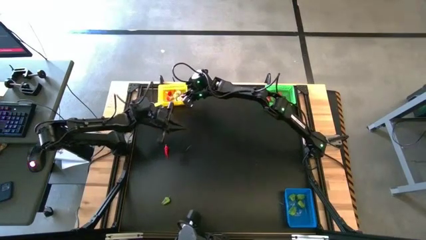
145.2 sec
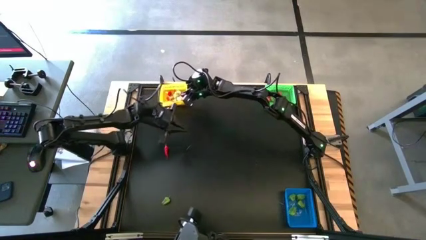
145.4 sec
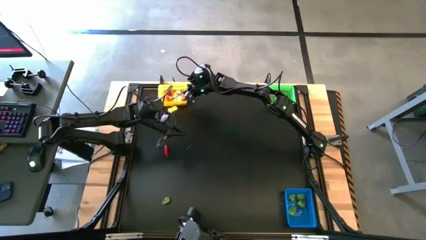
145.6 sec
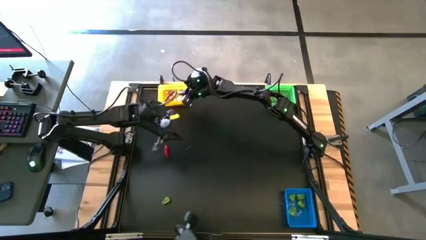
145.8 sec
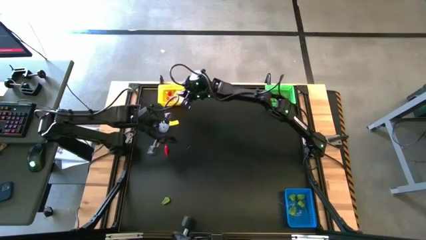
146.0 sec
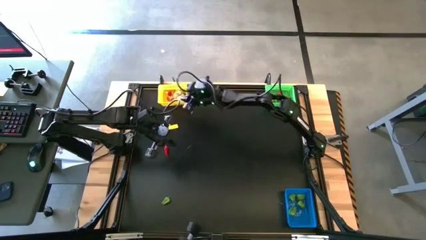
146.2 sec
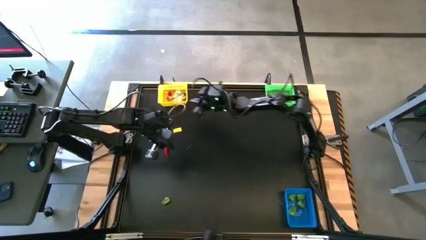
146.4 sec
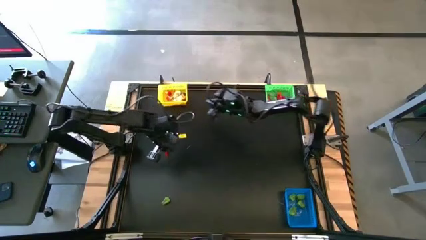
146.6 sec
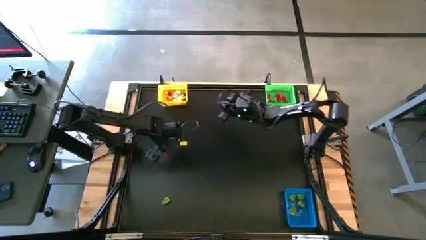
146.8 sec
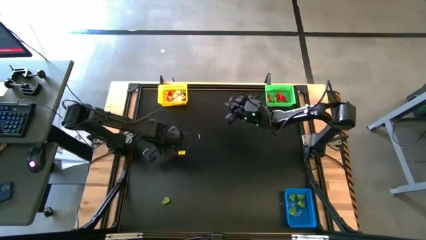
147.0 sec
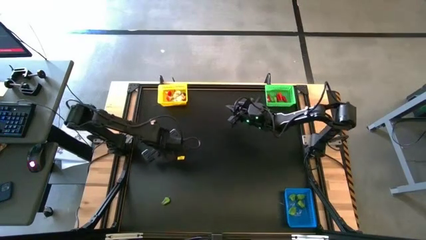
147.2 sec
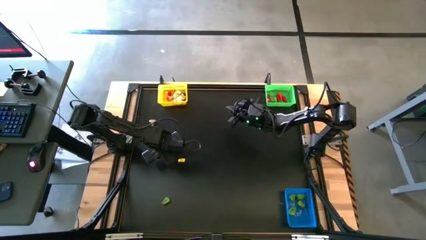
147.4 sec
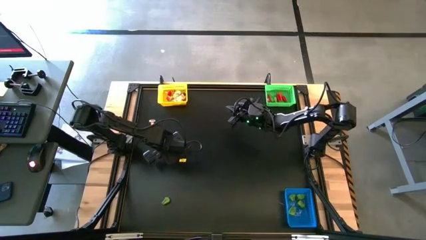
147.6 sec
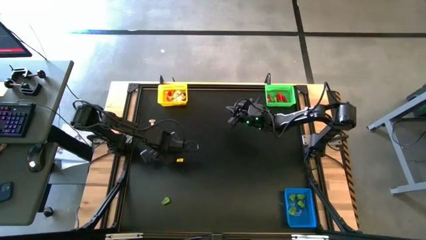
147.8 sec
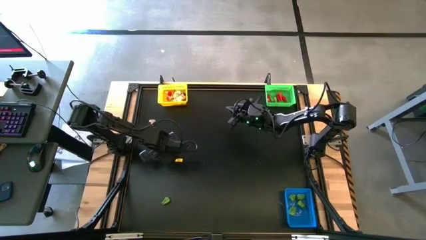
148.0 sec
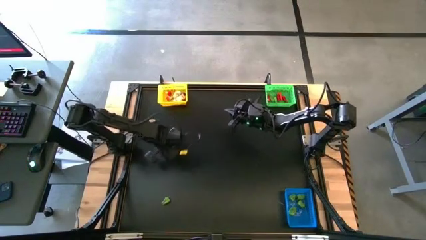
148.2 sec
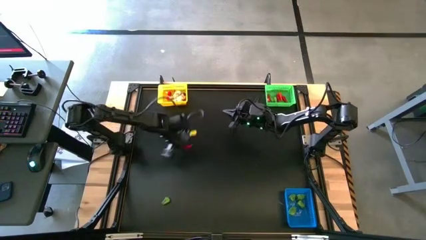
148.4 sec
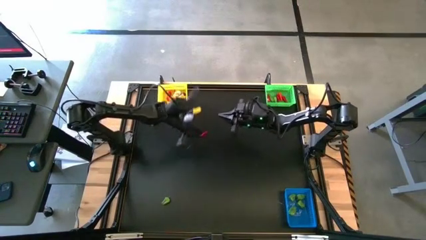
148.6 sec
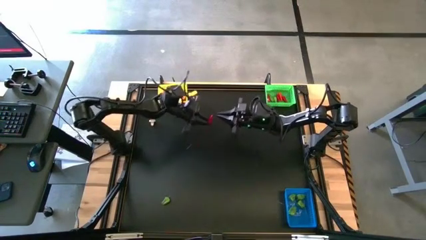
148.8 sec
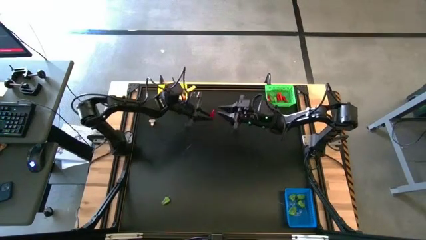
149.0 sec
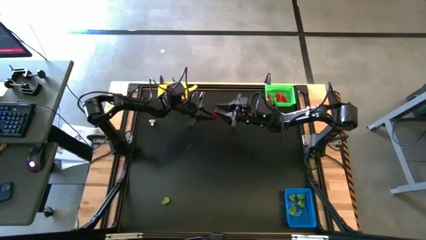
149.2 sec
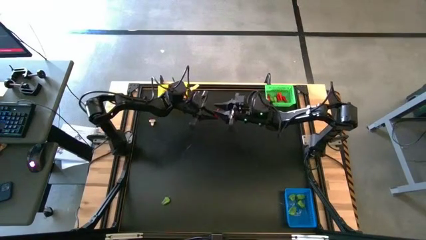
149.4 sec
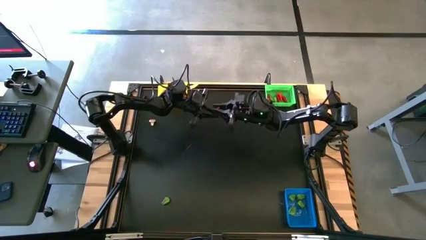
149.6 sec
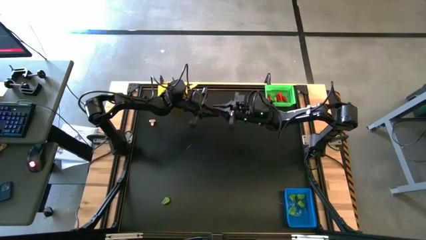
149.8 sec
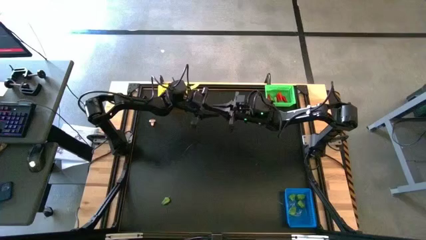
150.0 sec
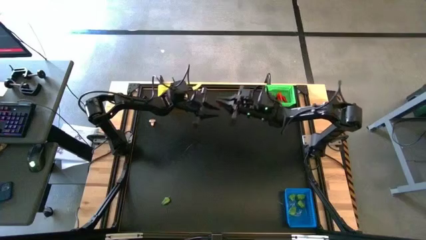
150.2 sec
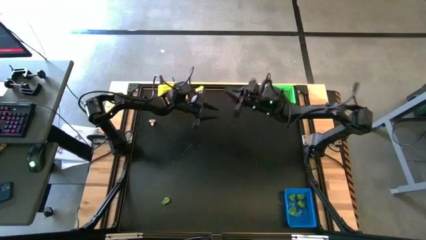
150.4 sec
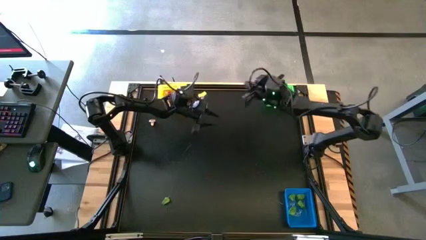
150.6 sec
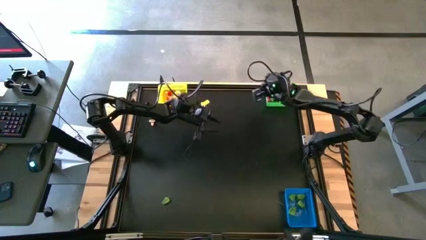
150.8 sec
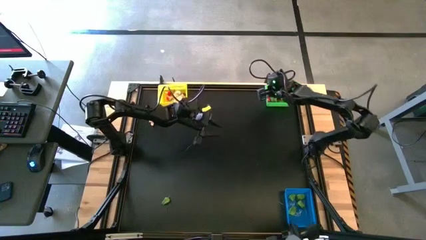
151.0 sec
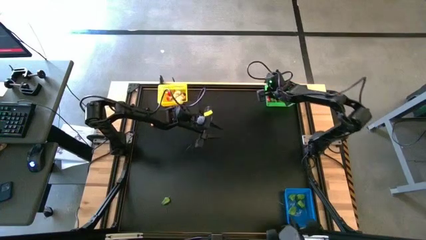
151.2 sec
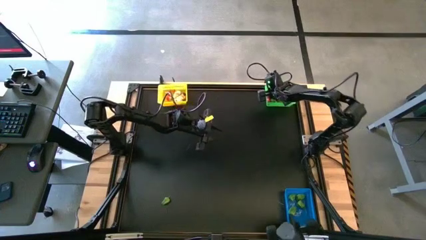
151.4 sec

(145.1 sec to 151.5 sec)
Task: Sort produce into baskets
Put the red chili pepper into the green bin

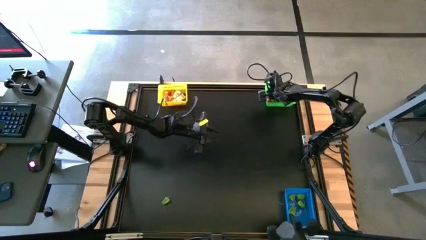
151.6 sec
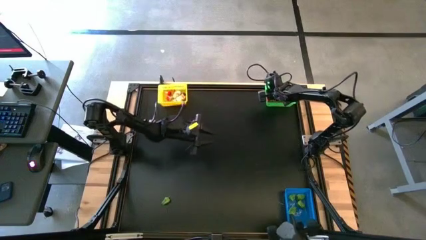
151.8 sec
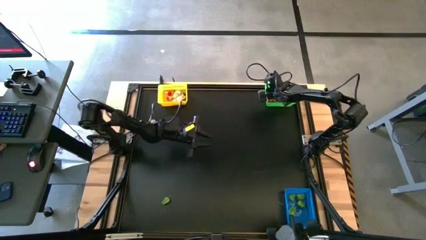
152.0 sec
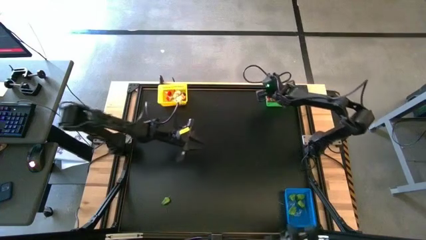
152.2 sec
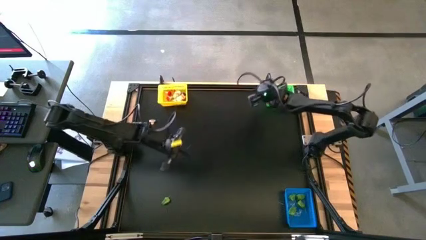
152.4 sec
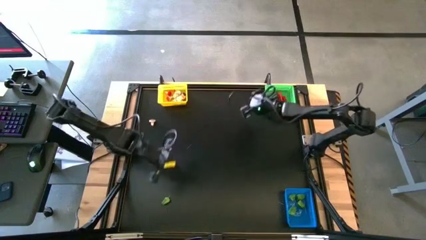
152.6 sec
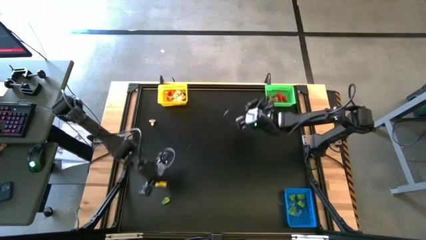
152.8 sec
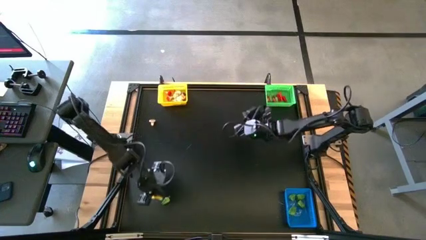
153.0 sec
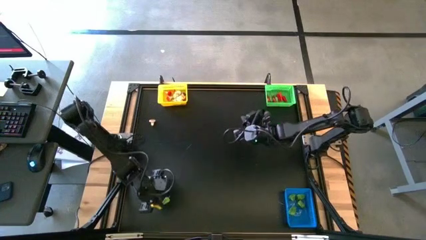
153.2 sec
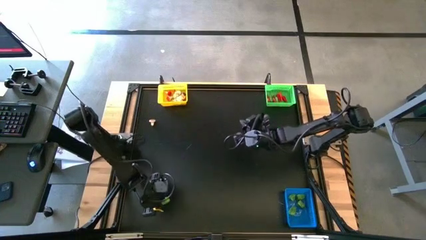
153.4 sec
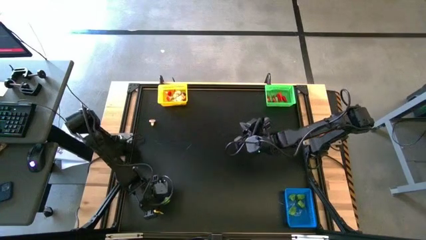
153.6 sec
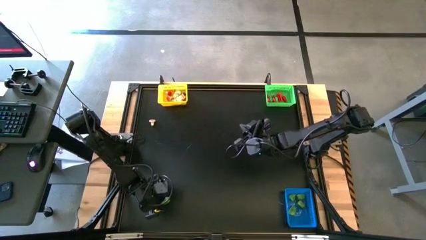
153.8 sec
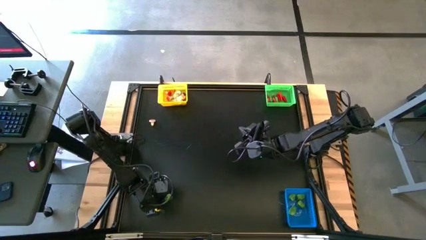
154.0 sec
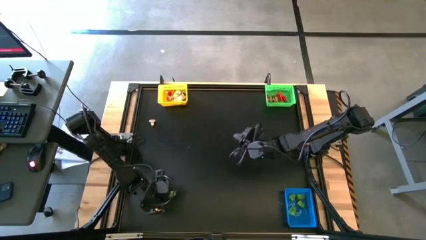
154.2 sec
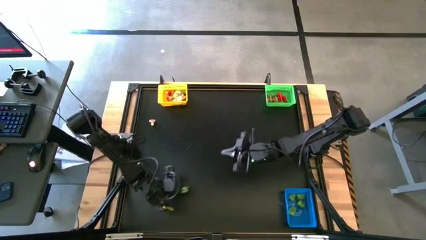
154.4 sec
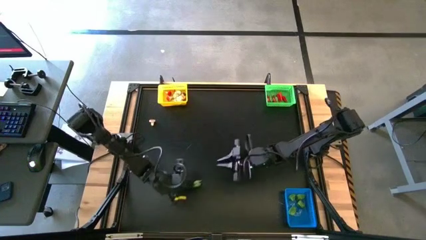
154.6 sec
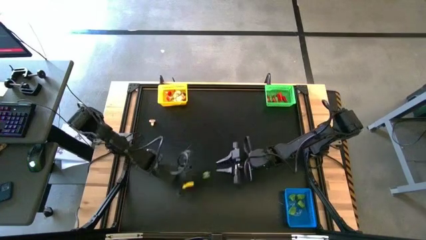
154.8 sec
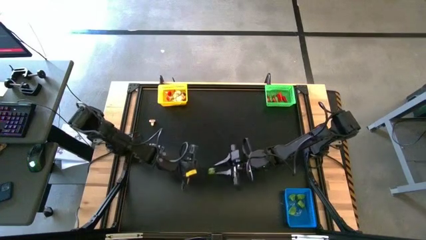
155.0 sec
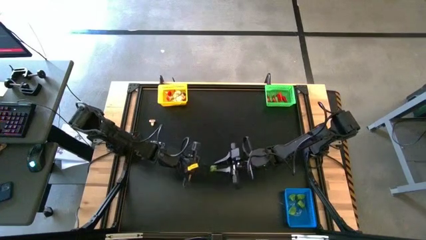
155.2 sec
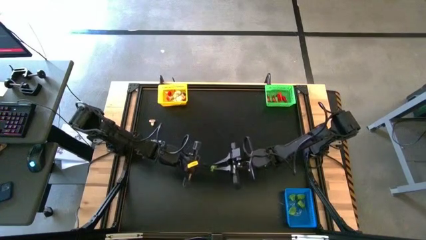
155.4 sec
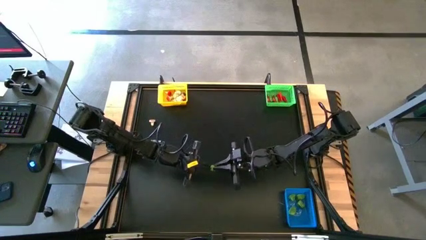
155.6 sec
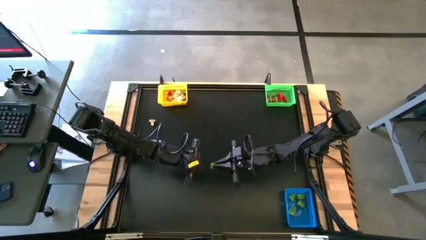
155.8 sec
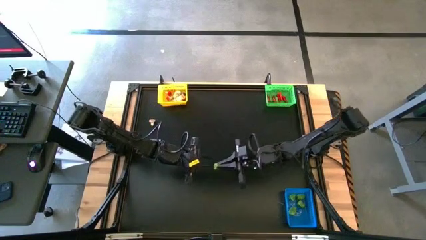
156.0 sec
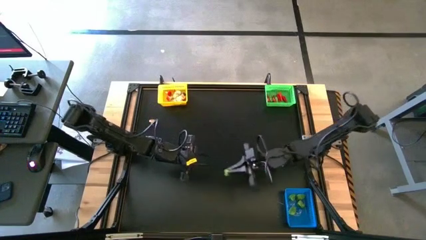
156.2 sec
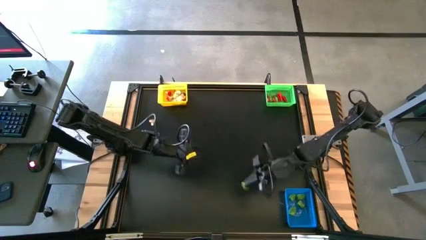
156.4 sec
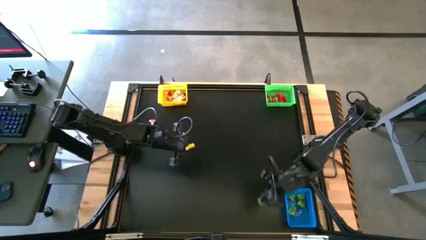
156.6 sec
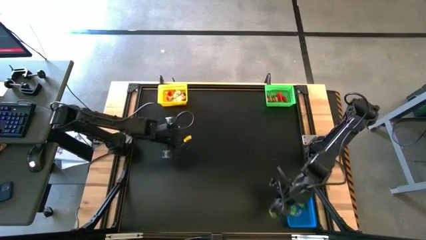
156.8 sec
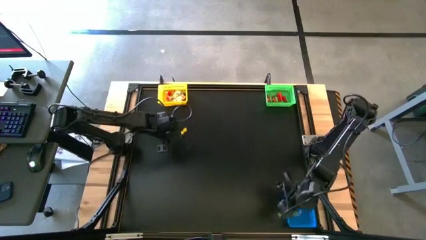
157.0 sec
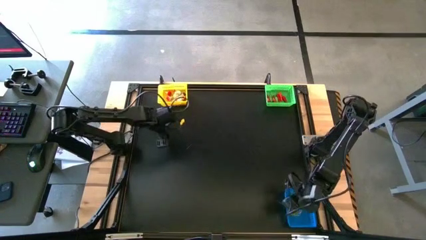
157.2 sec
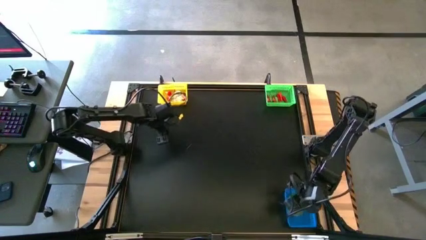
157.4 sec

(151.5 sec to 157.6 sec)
Put the green bell pepper into the blue bin

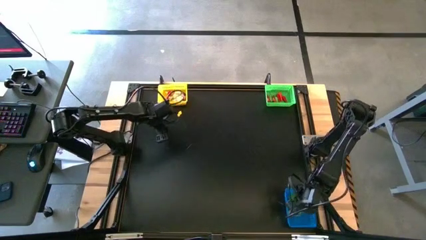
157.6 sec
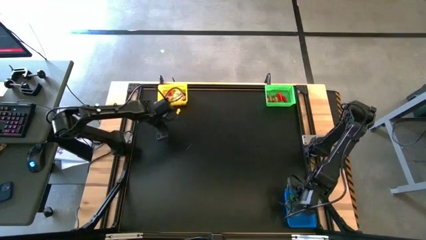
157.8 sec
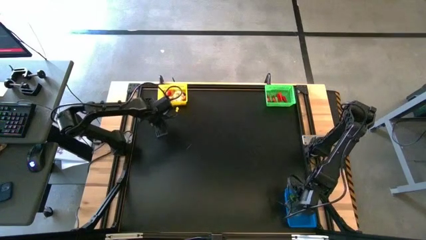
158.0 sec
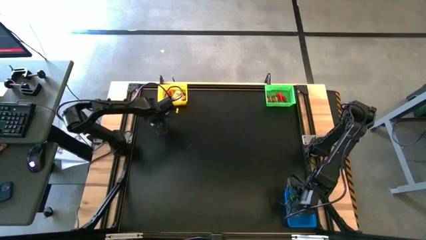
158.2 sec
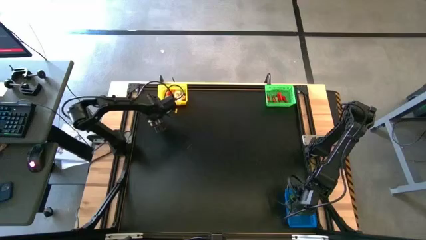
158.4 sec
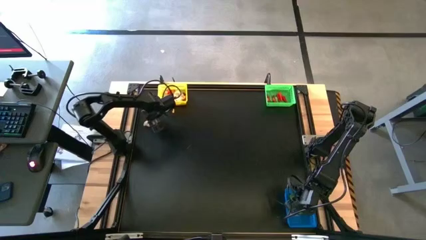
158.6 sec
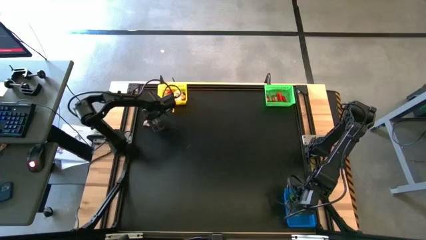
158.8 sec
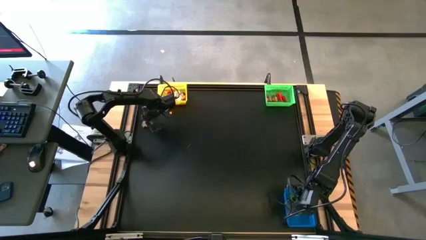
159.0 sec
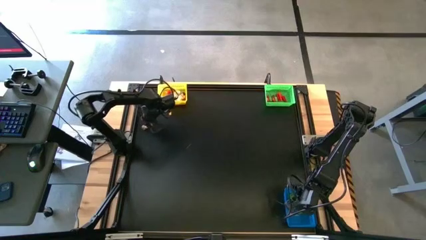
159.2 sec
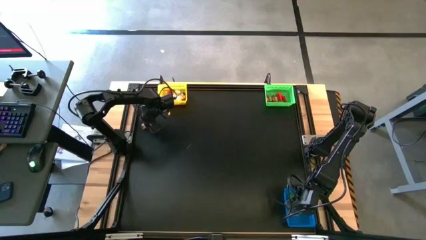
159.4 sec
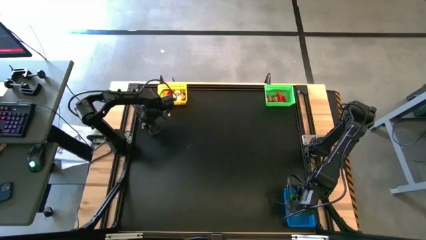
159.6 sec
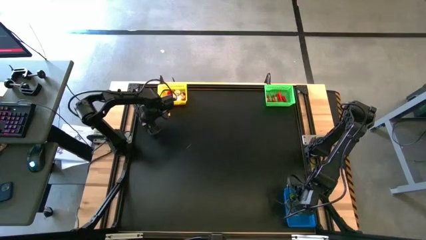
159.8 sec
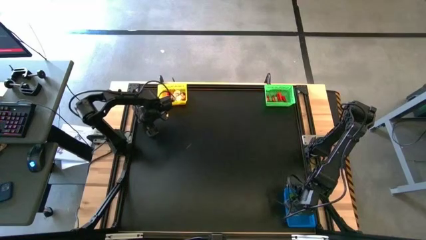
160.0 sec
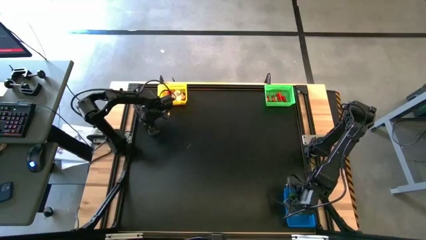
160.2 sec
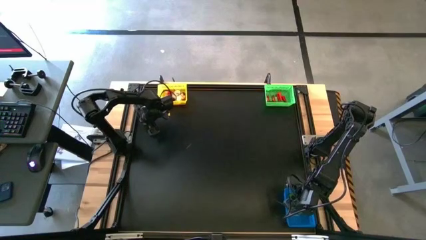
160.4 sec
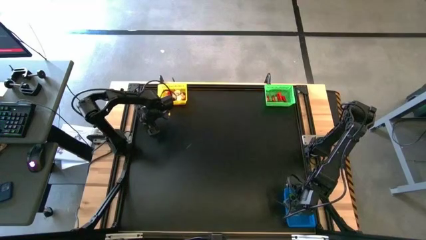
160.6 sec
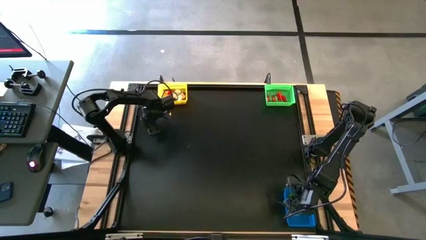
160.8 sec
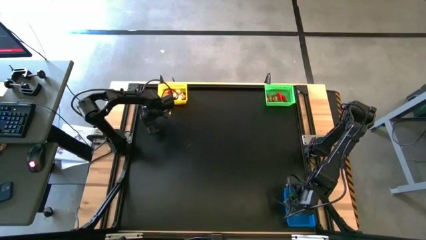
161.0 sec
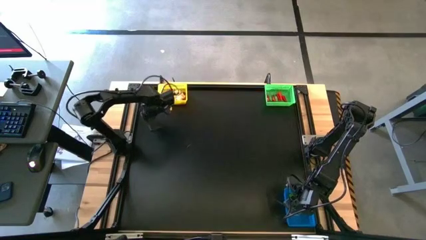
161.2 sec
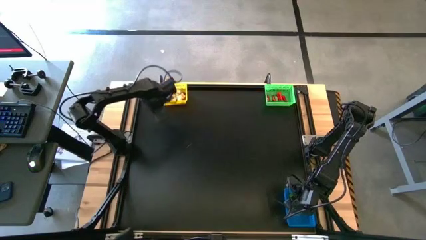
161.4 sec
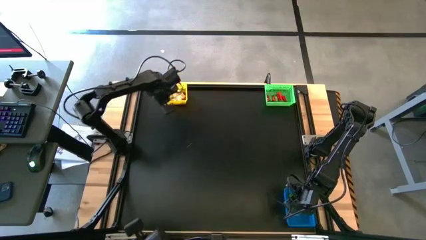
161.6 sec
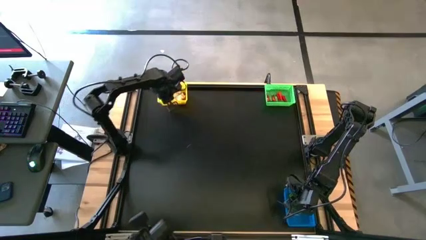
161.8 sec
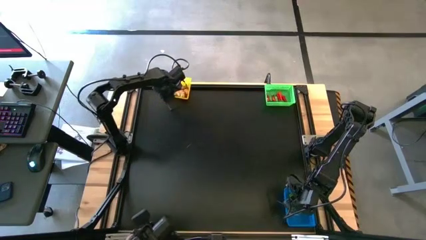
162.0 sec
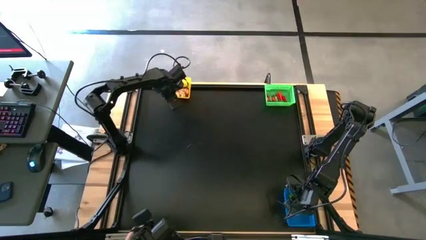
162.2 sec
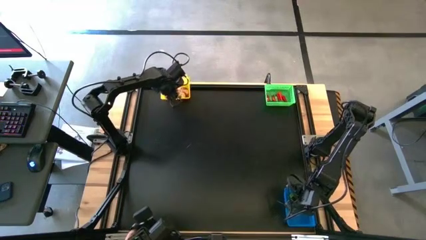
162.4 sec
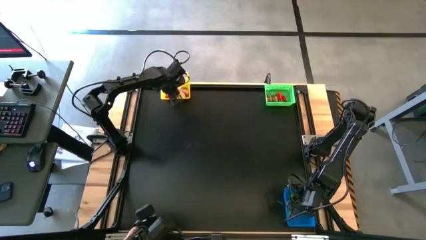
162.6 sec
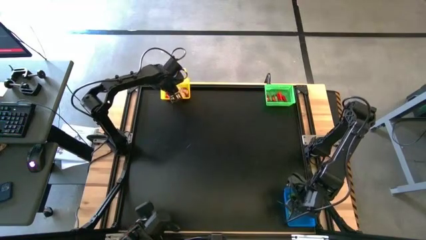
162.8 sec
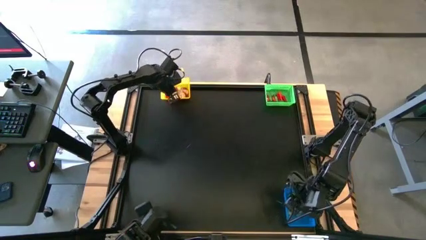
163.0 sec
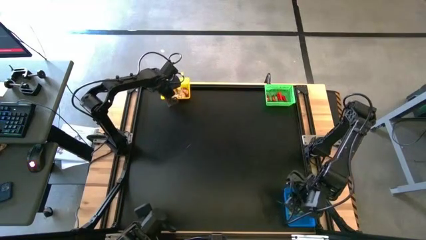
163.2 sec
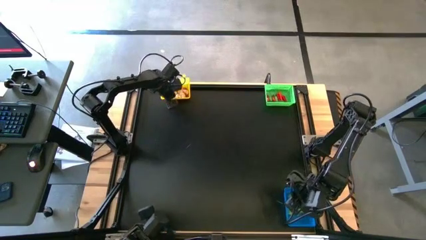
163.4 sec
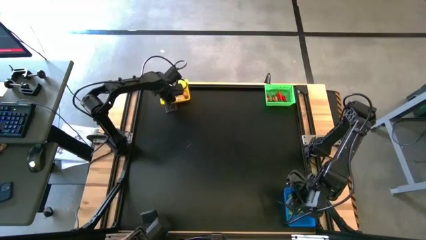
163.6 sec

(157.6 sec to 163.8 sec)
Put the brown mushroom into the yellow bin
